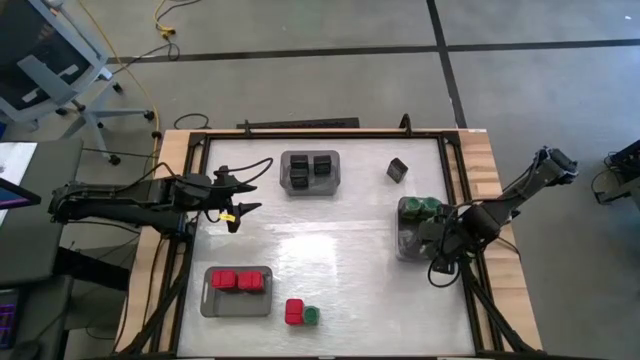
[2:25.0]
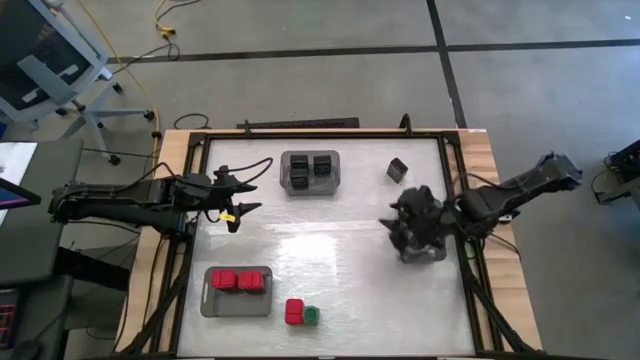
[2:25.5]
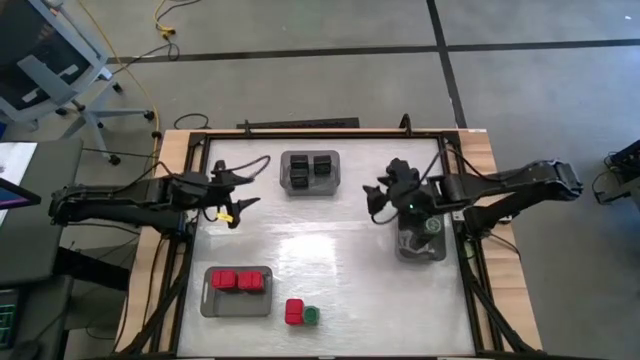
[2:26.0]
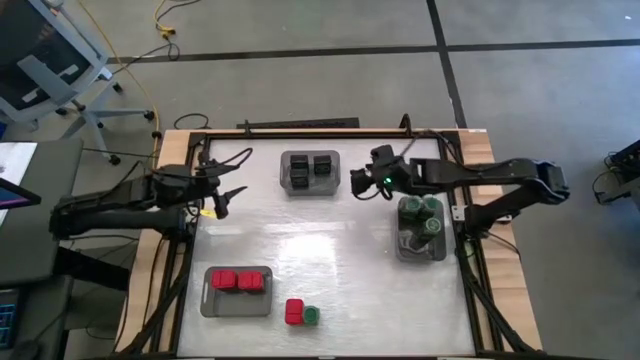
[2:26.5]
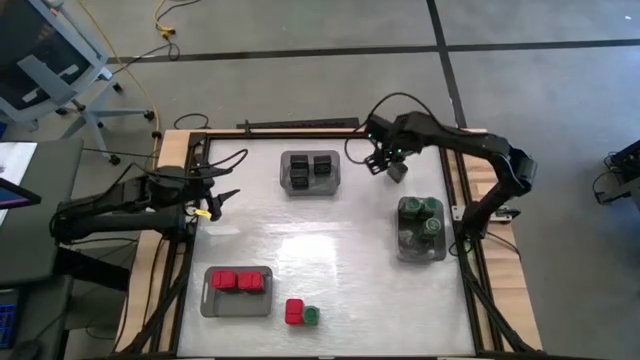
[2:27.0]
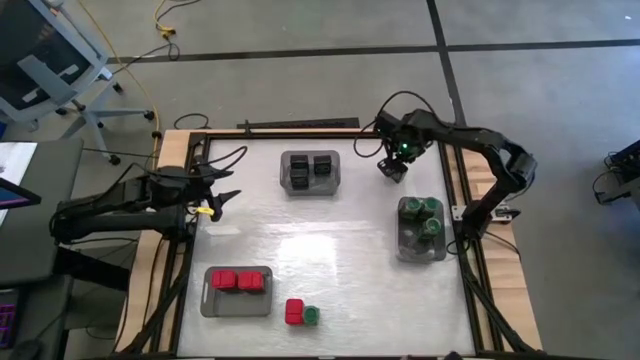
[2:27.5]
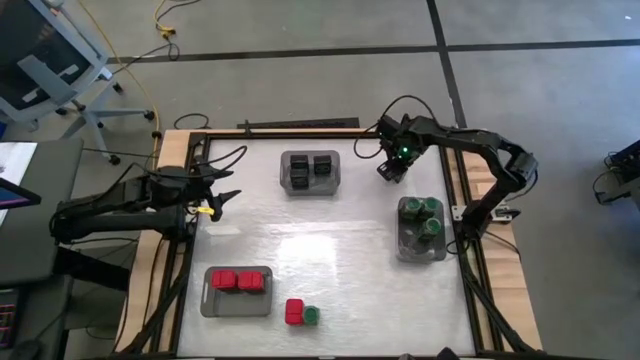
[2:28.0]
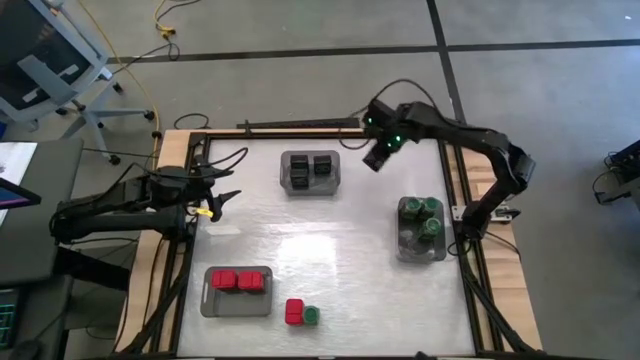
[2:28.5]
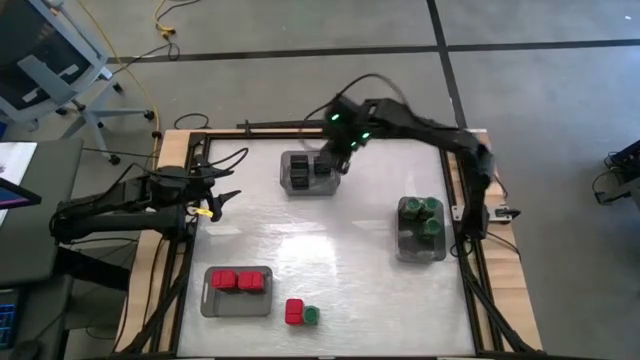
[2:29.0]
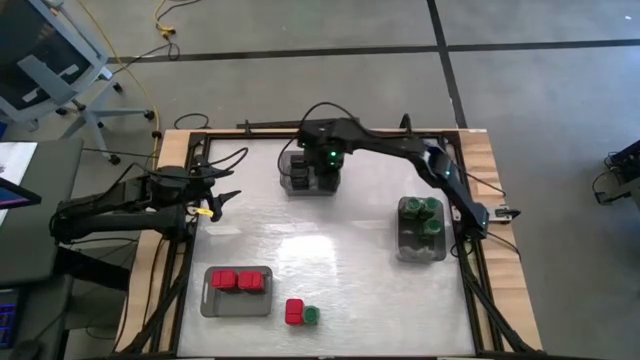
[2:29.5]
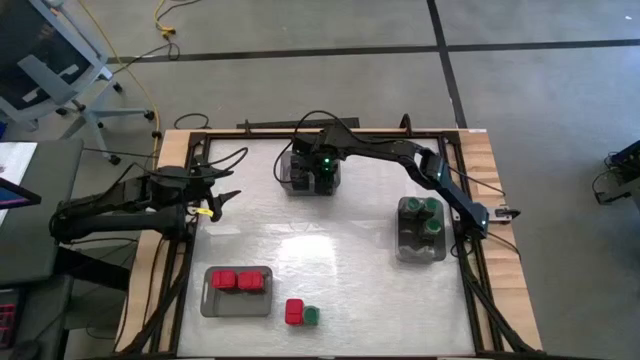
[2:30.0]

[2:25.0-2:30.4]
Task: Sort spices by type
Put the black seasoning can into the top black transparent bin

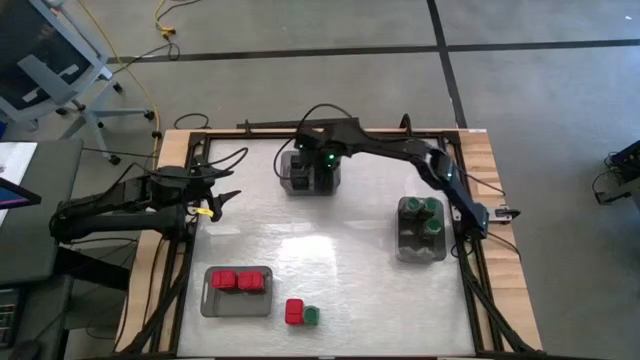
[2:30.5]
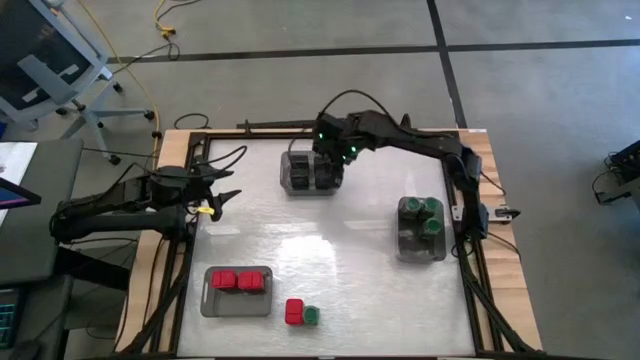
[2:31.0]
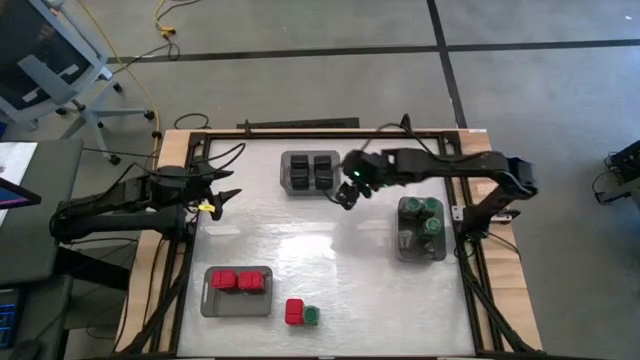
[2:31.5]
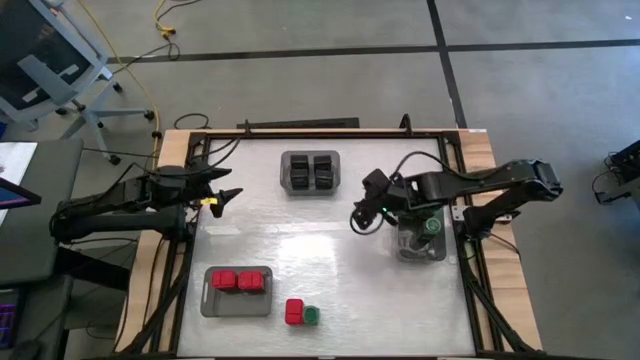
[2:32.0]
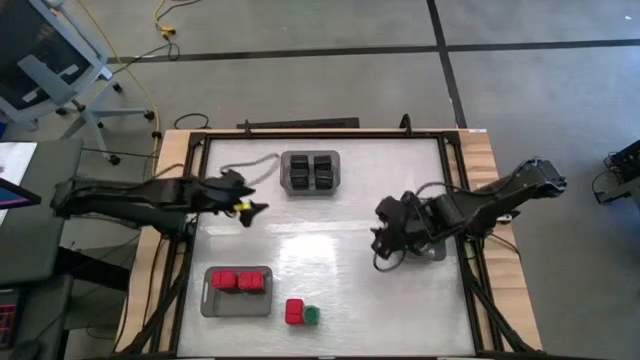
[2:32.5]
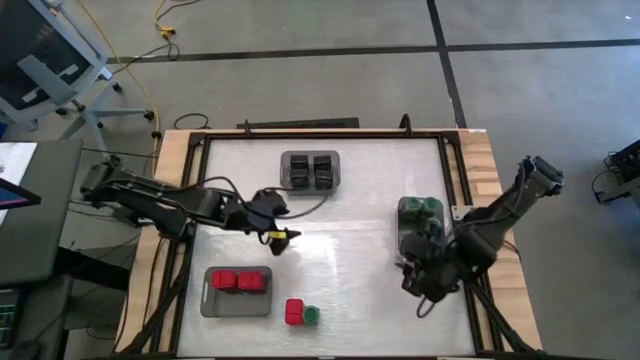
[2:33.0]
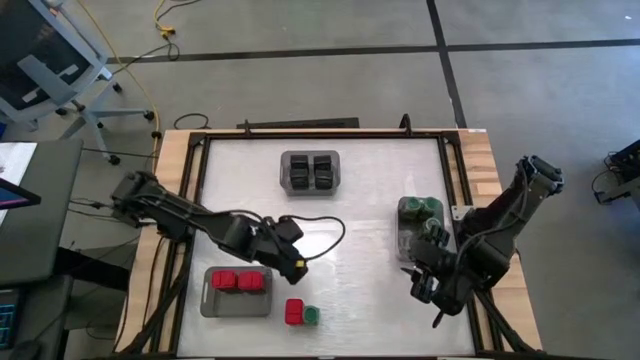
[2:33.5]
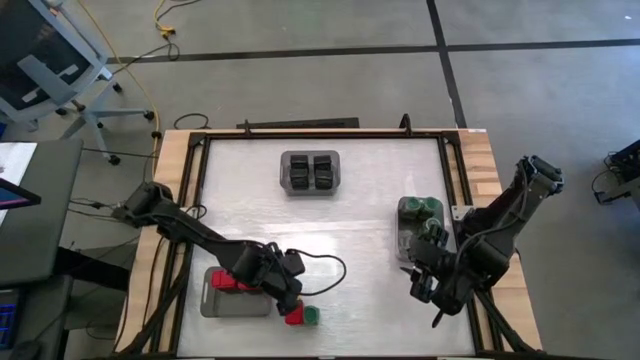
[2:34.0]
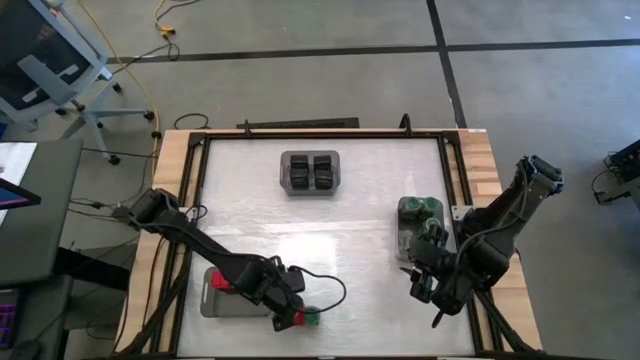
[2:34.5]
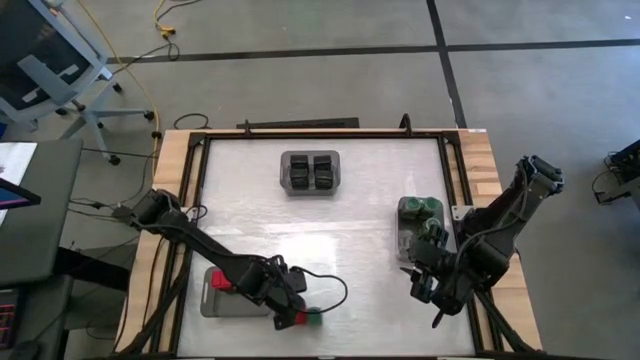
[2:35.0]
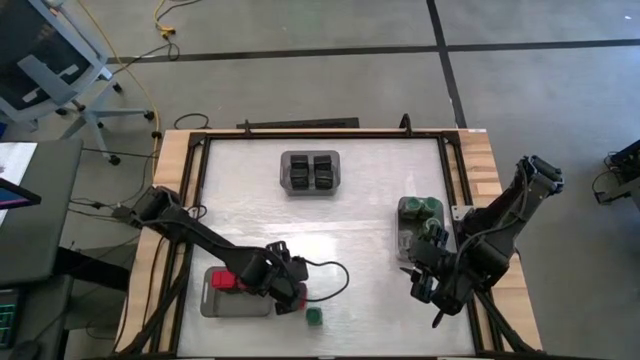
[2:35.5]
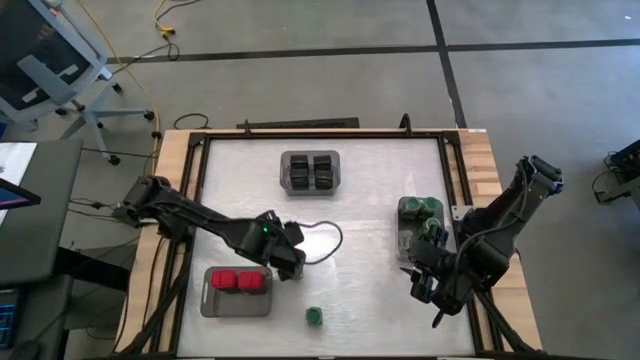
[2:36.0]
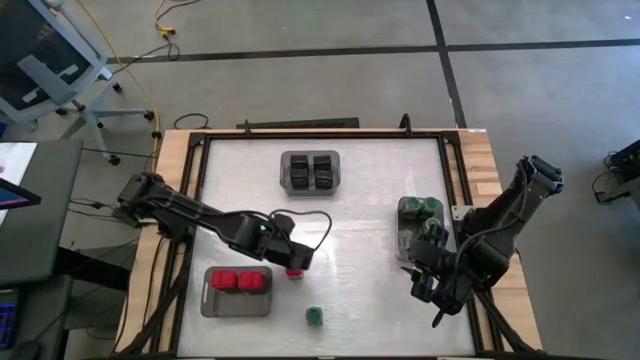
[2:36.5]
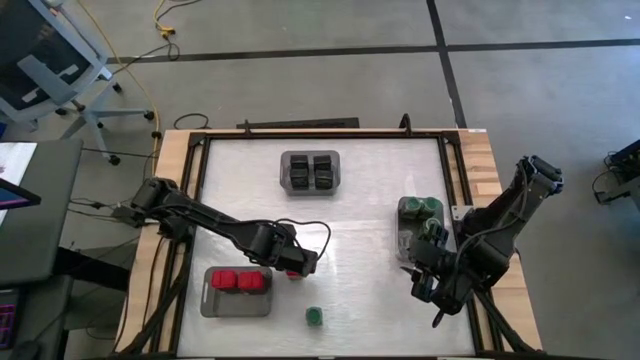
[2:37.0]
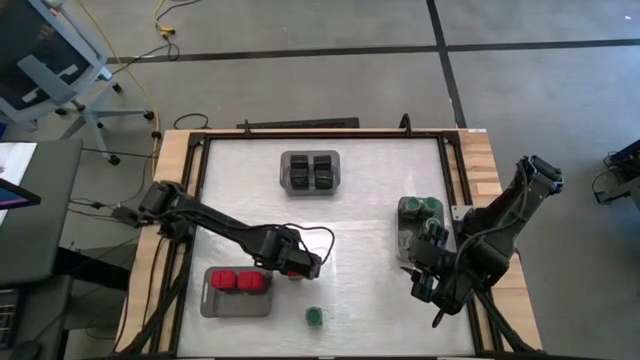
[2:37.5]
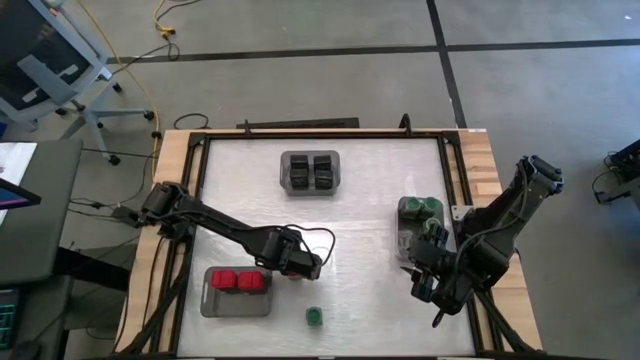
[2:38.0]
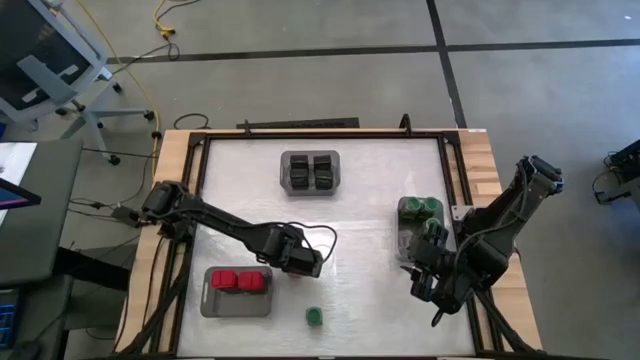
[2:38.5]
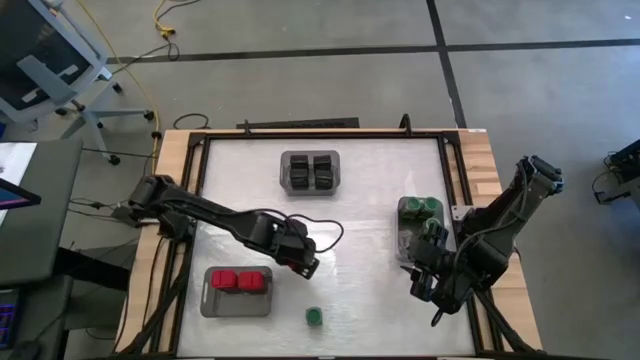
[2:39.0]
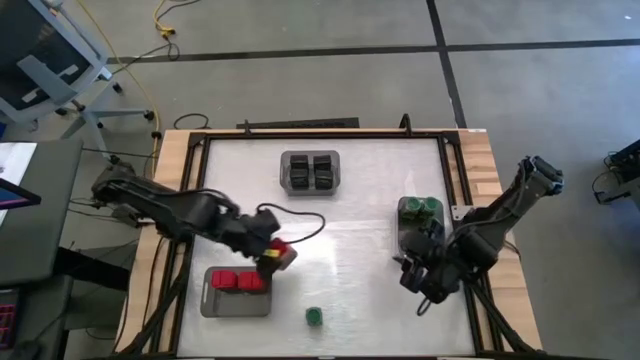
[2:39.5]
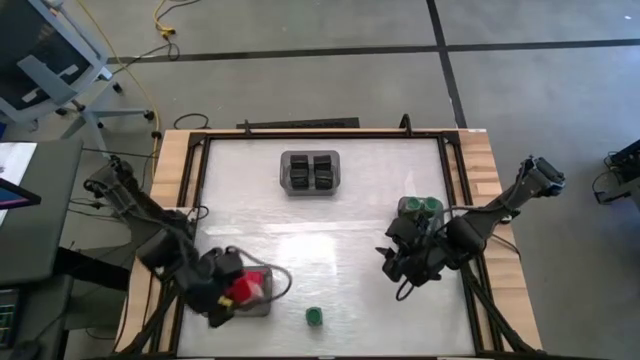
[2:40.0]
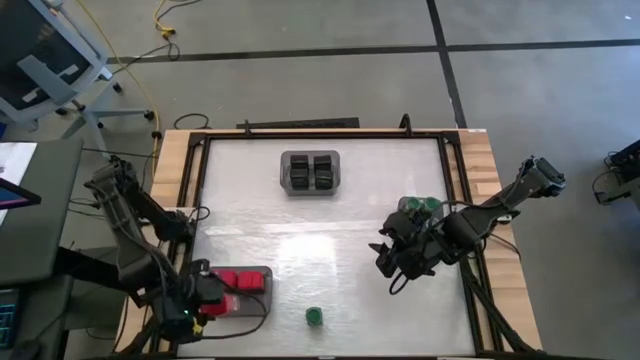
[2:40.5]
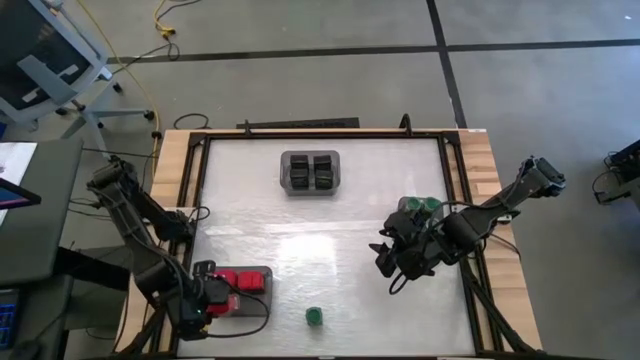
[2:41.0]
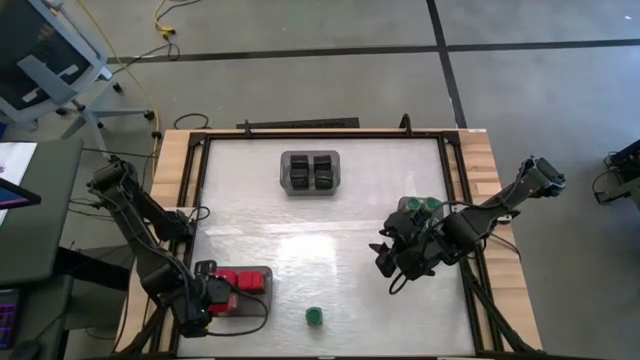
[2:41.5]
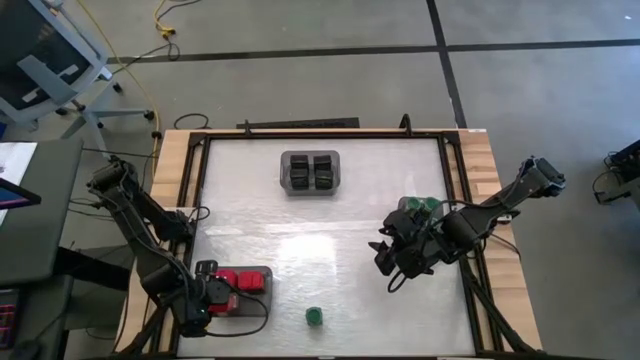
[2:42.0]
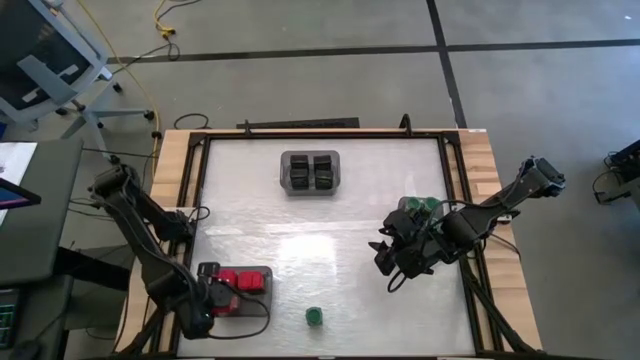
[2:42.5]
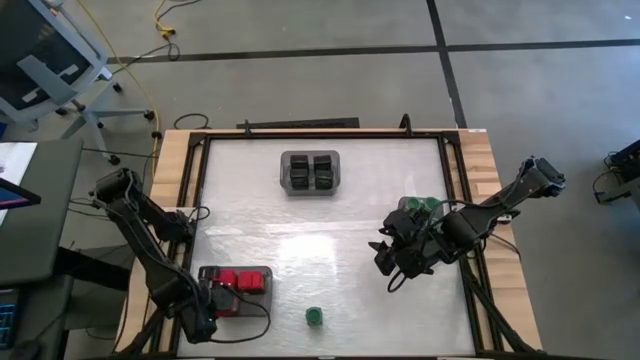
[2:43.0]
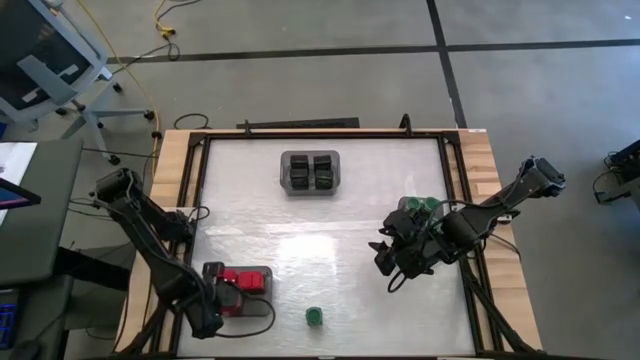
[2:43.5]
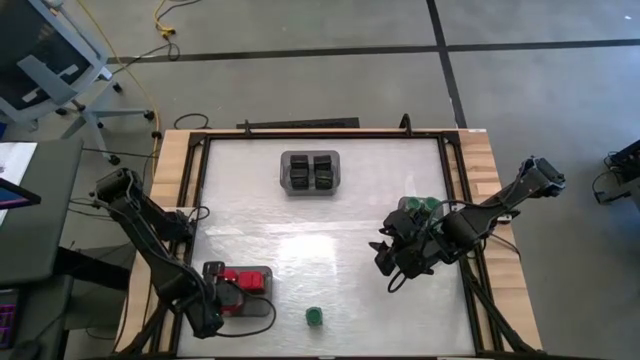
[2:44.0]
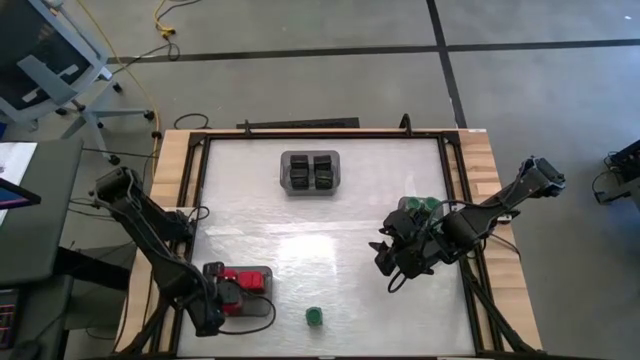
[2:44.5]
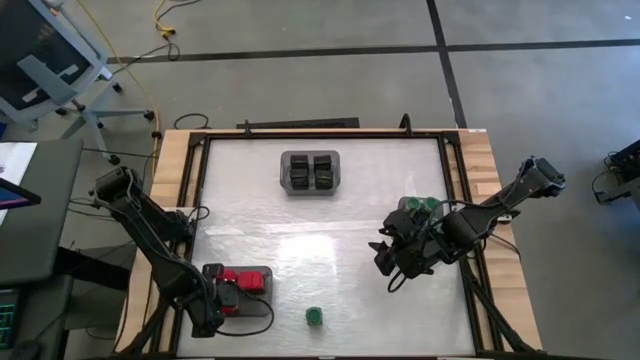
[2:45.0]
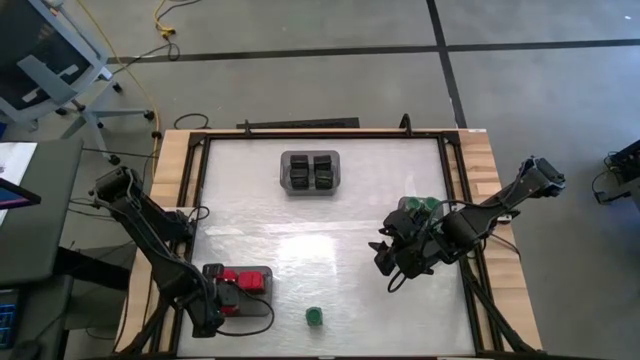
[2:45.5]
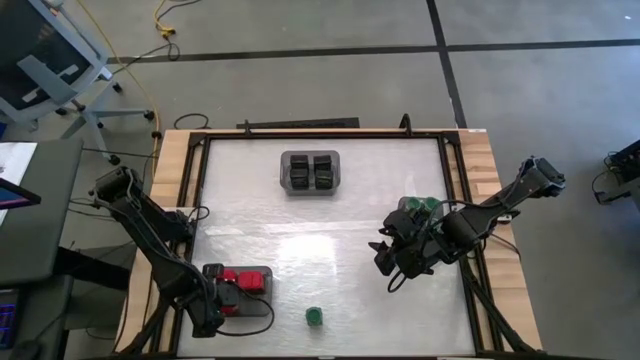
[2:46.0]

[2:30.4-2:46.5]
Put the red seasoning can into the bottom black transparent bin
